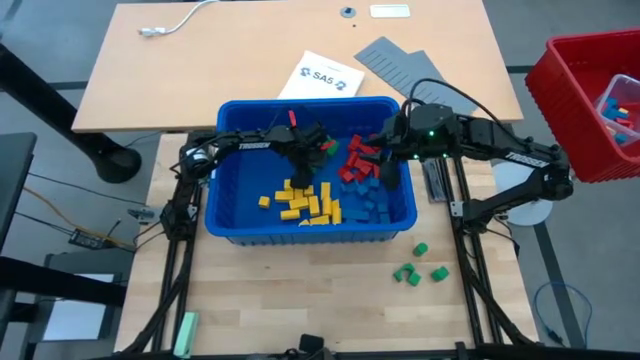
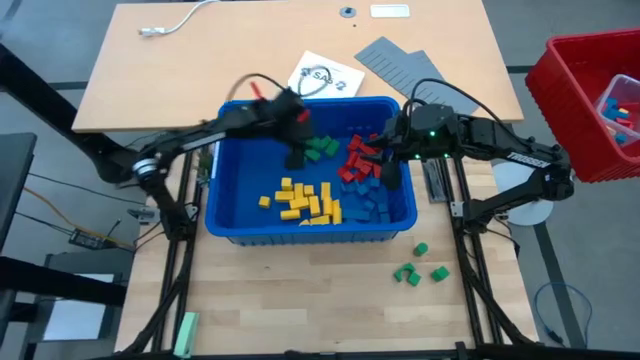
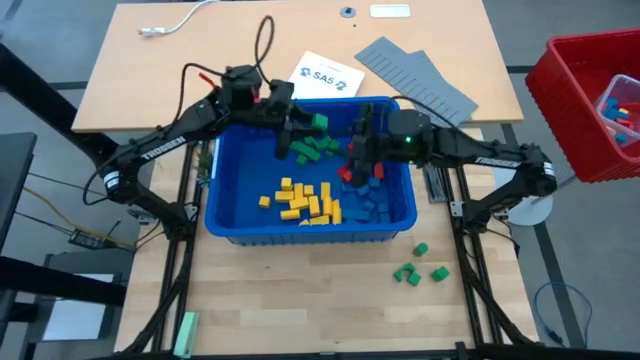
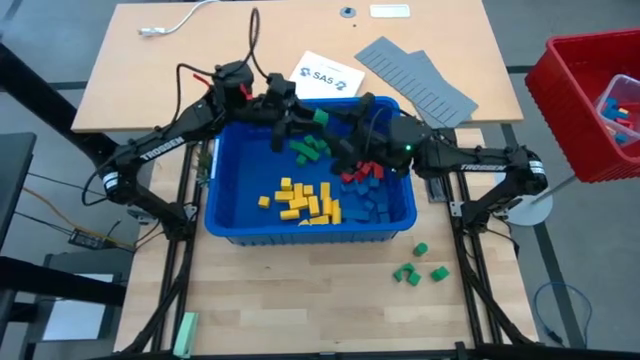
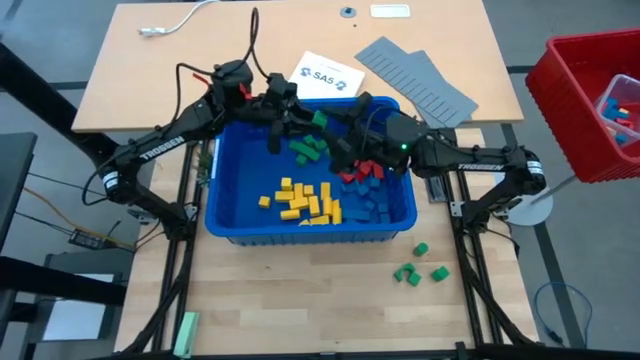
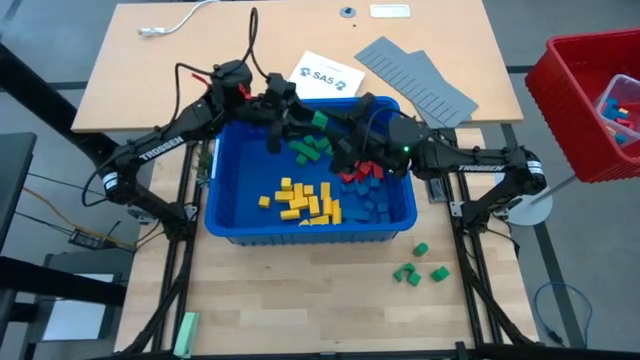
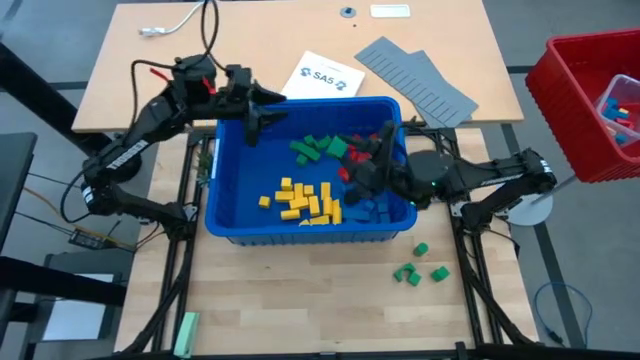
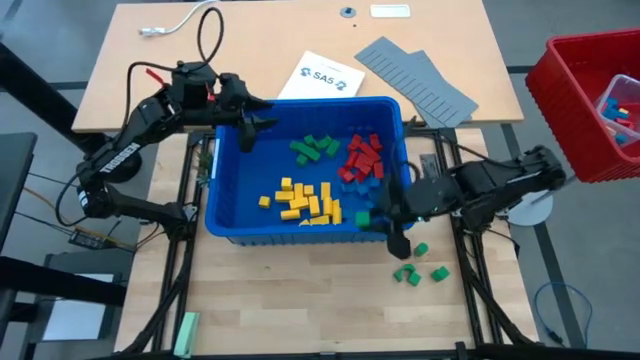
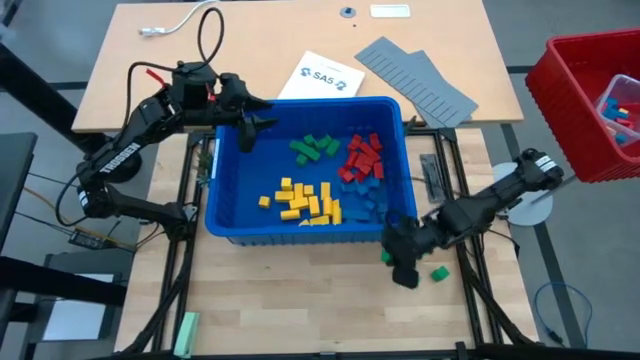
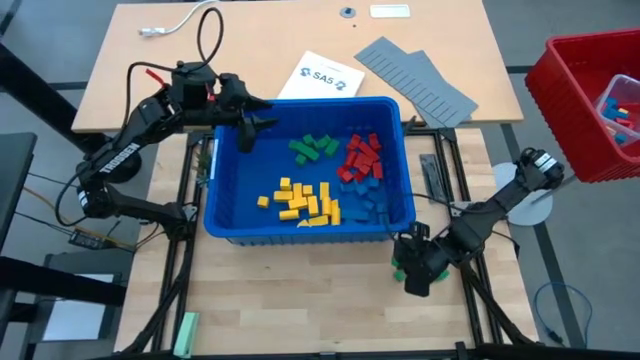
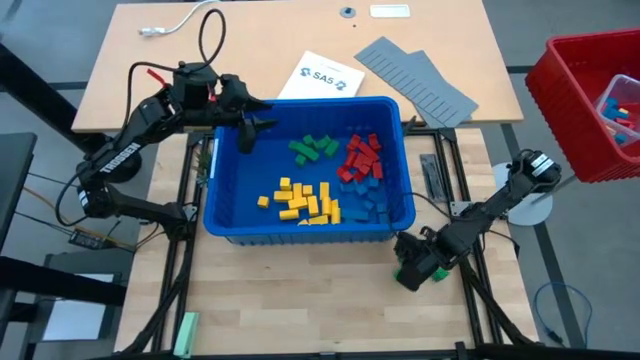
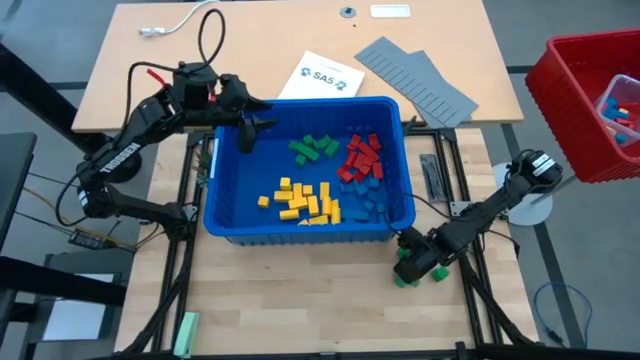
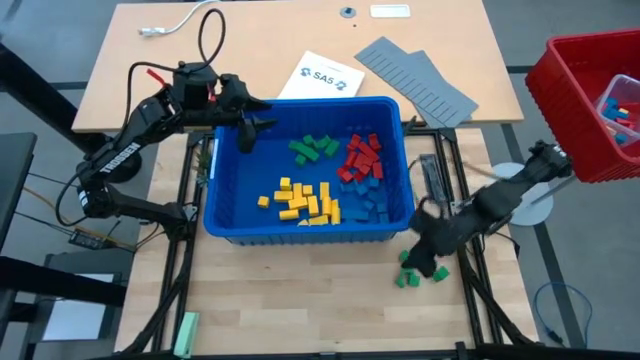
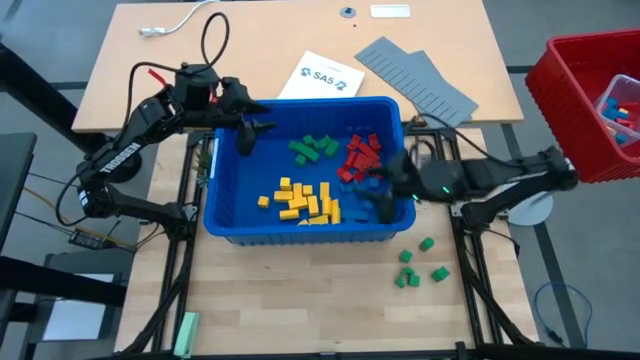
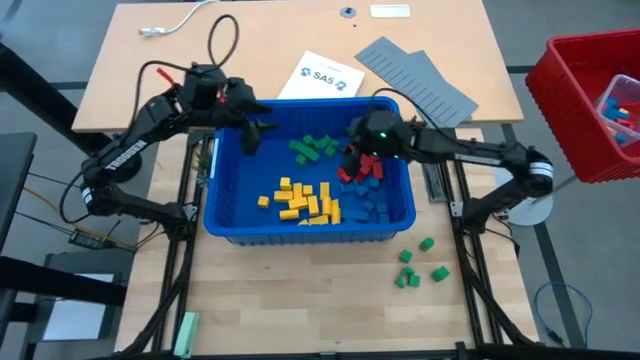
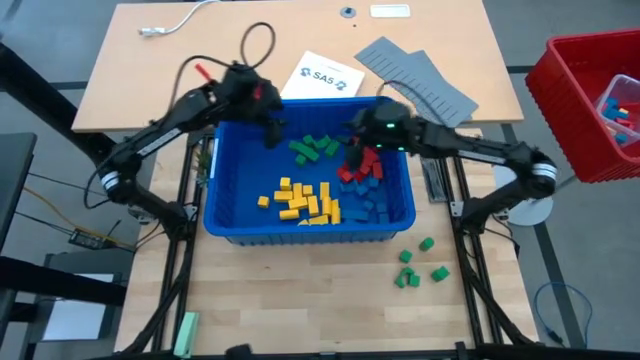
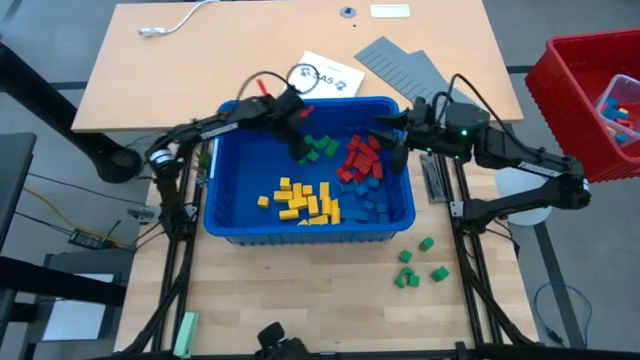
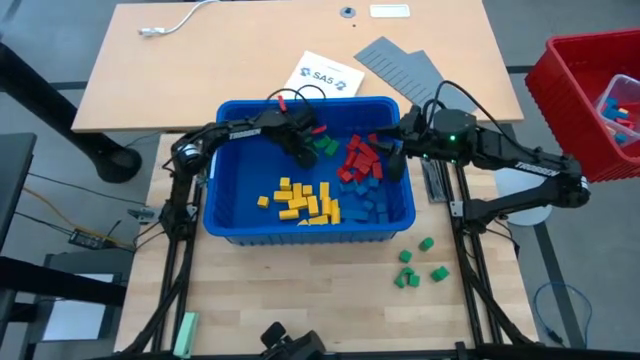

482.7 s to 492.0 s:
Task: Sort blocks
Remove the green block from the blue bin

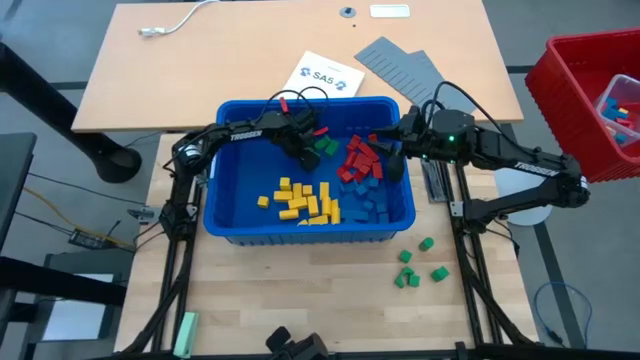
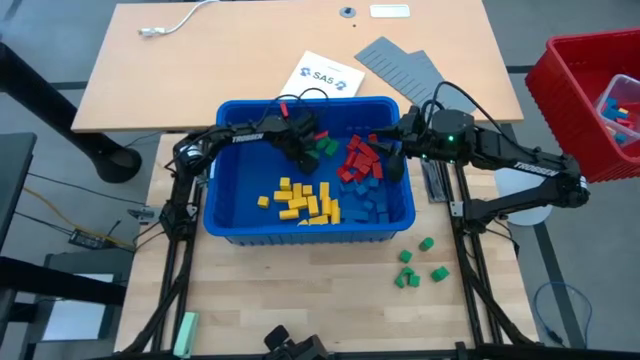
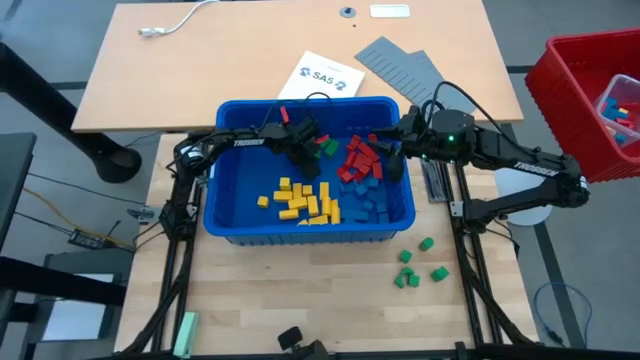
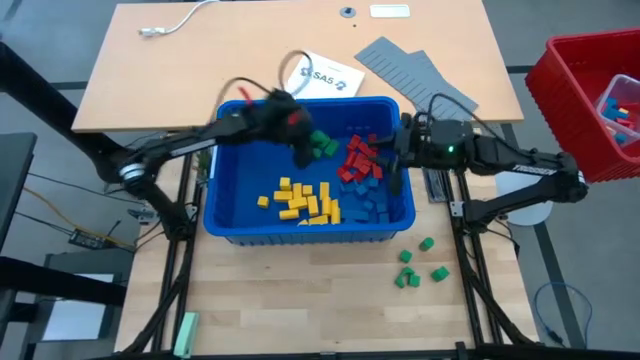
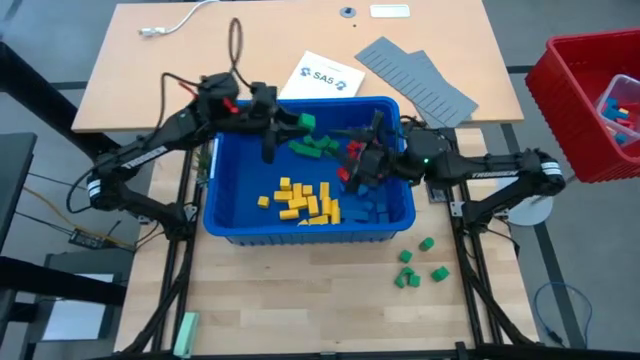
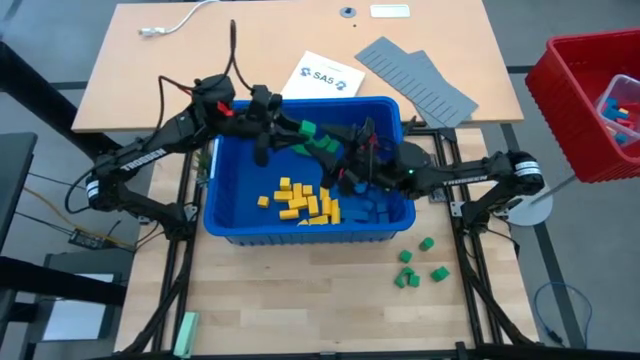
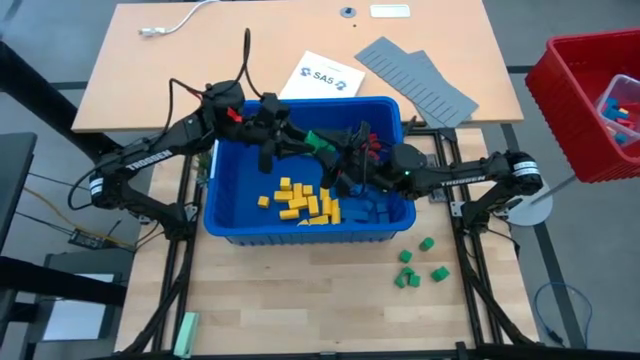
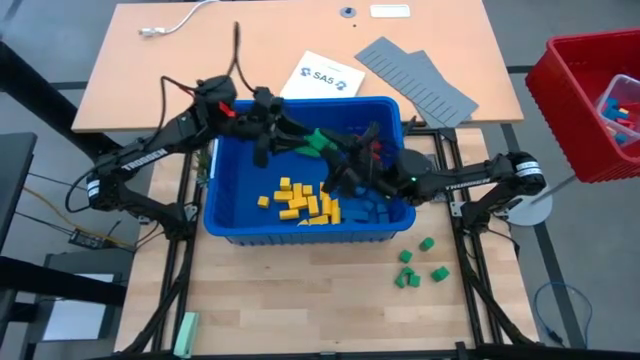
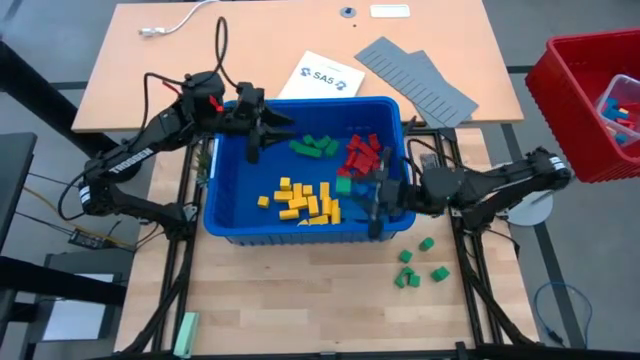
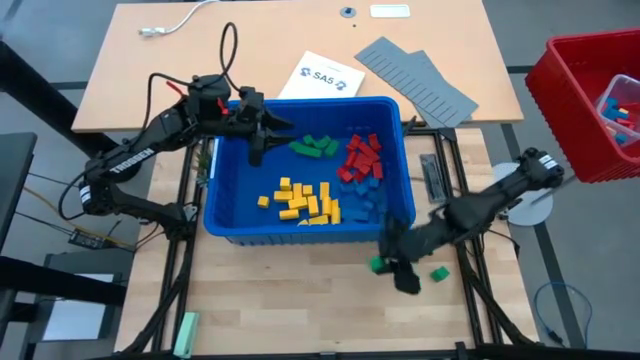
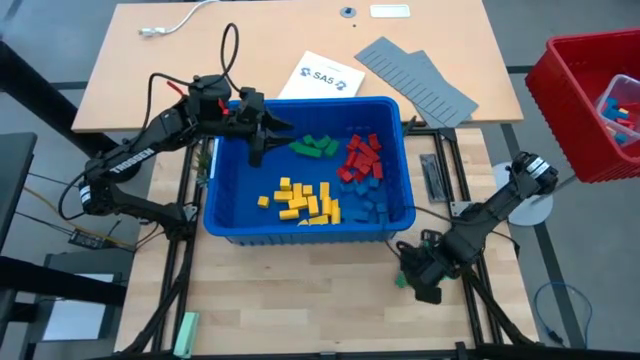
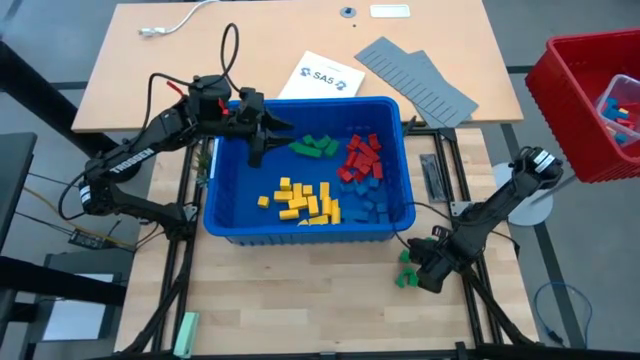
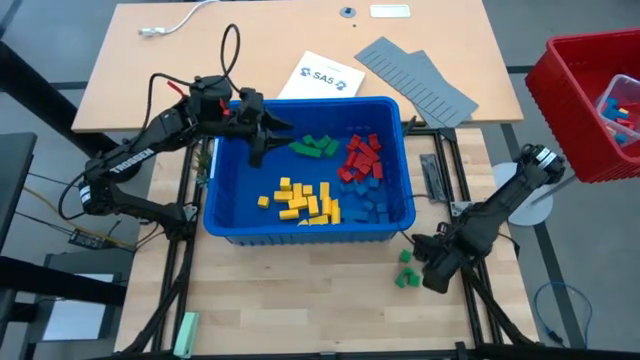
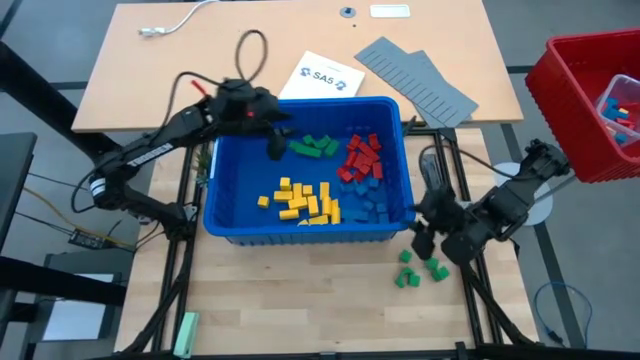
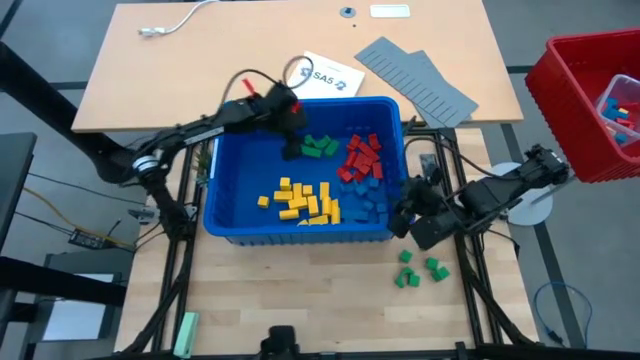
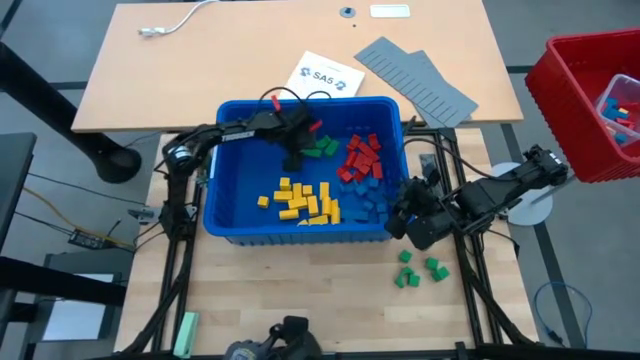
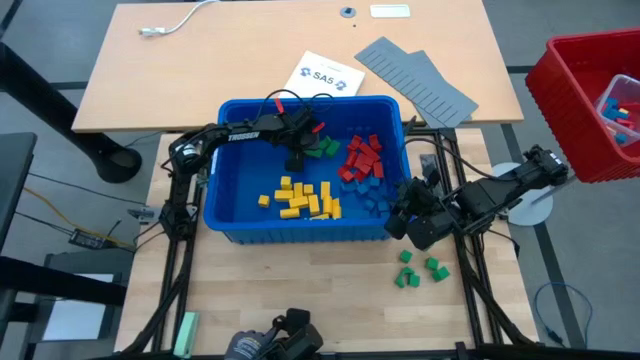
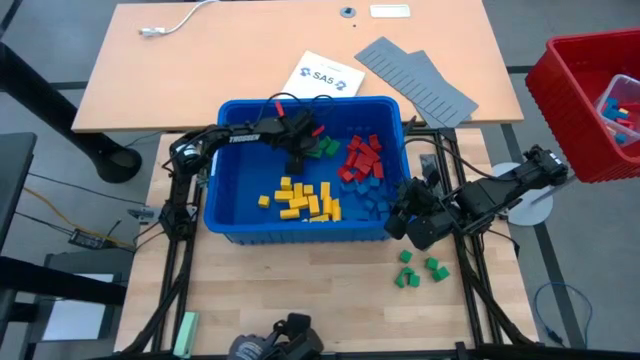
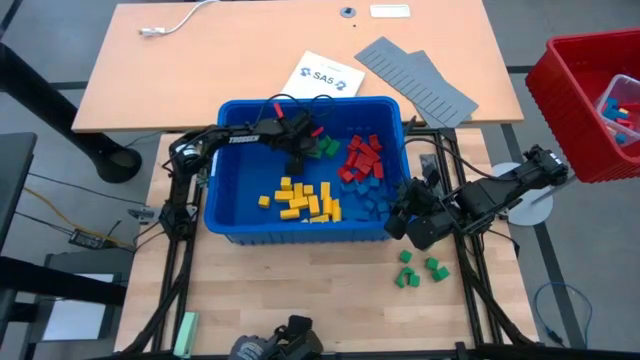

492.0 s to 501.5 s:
Remove the green block from the blue bin
